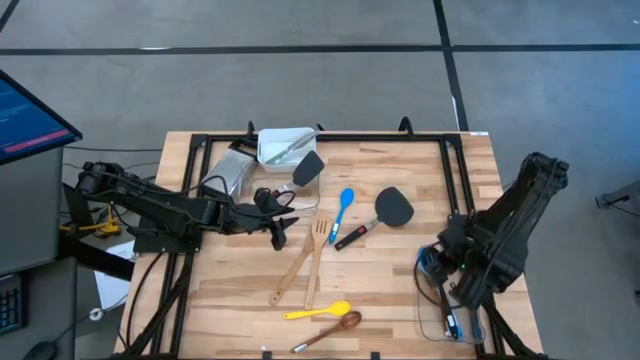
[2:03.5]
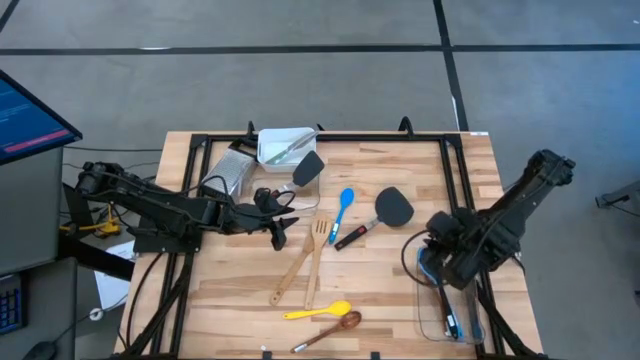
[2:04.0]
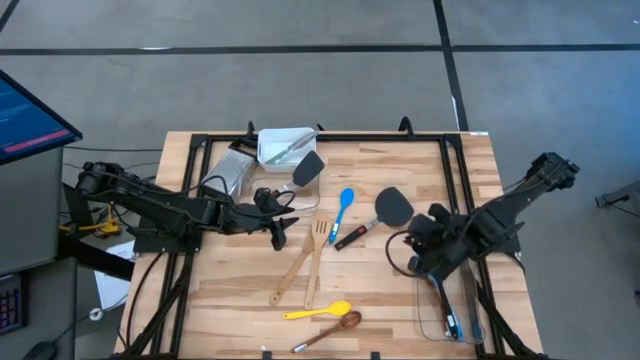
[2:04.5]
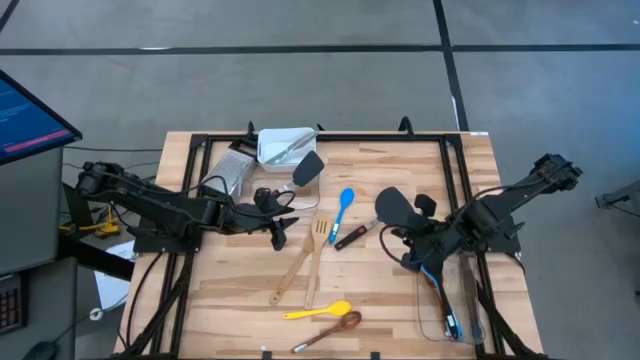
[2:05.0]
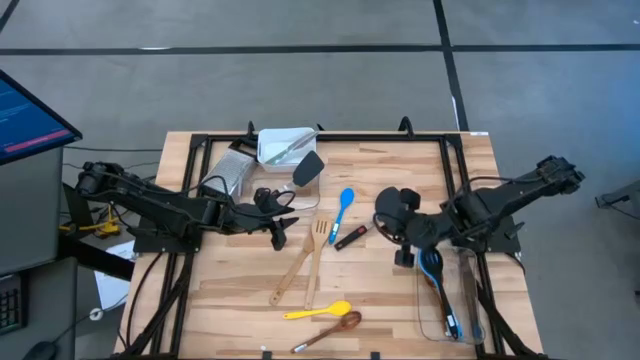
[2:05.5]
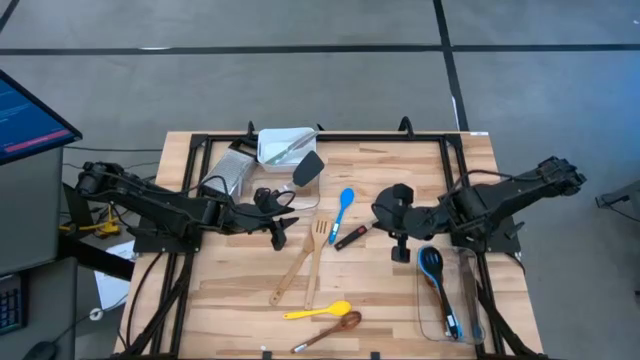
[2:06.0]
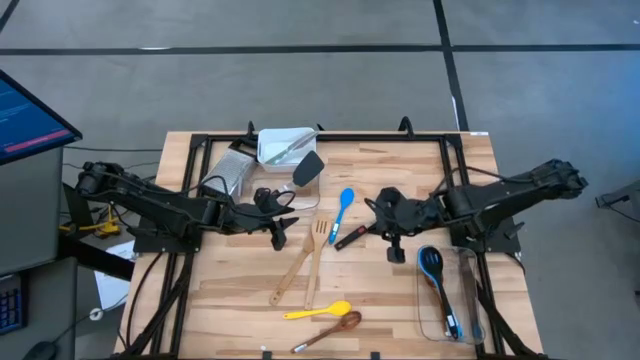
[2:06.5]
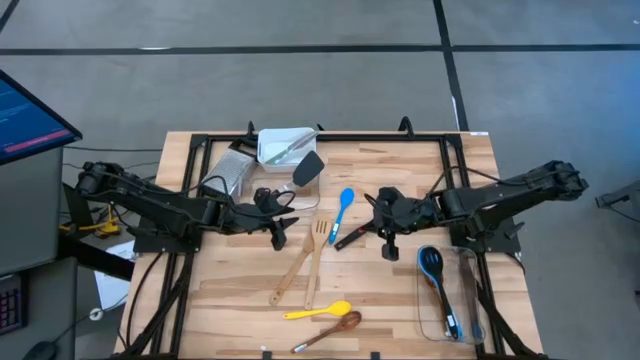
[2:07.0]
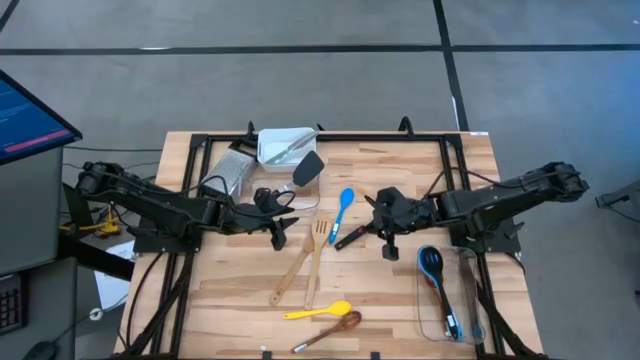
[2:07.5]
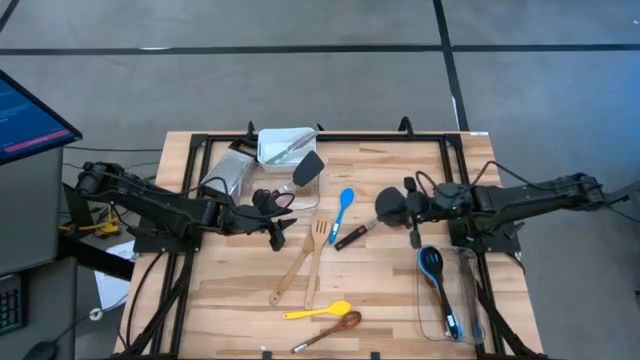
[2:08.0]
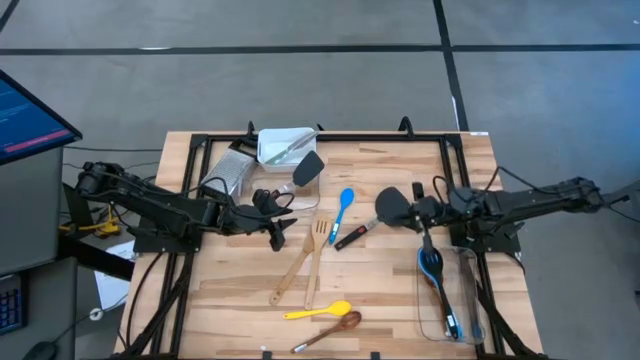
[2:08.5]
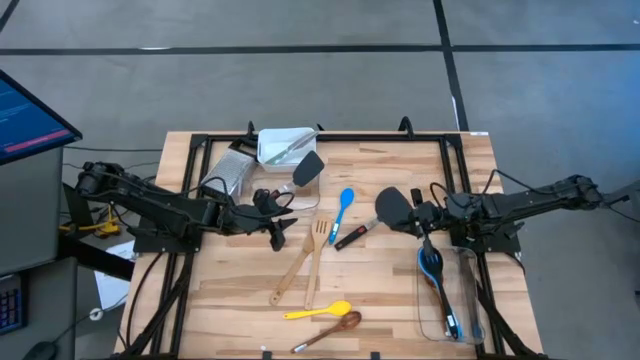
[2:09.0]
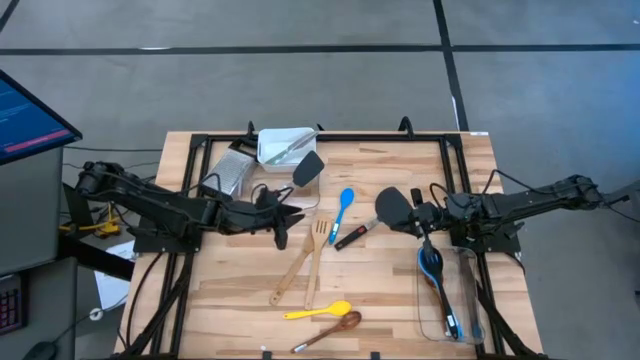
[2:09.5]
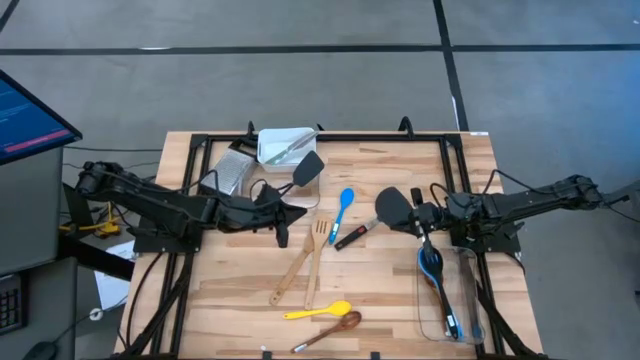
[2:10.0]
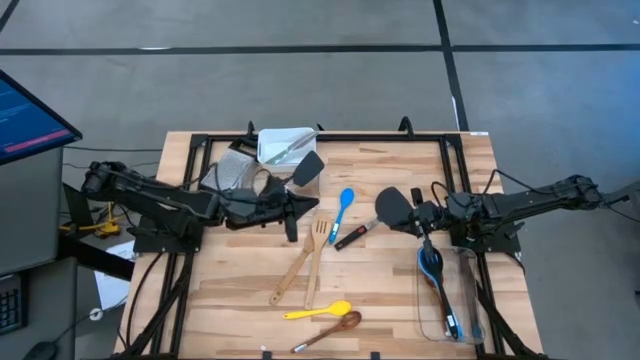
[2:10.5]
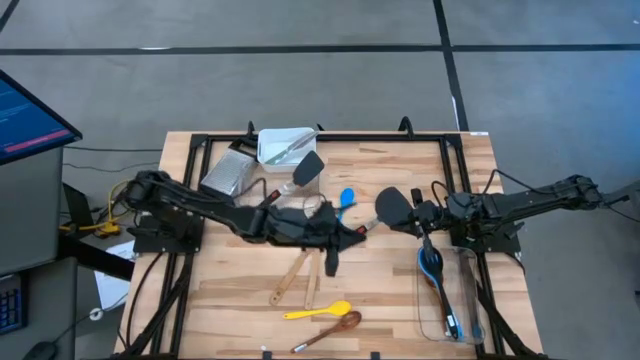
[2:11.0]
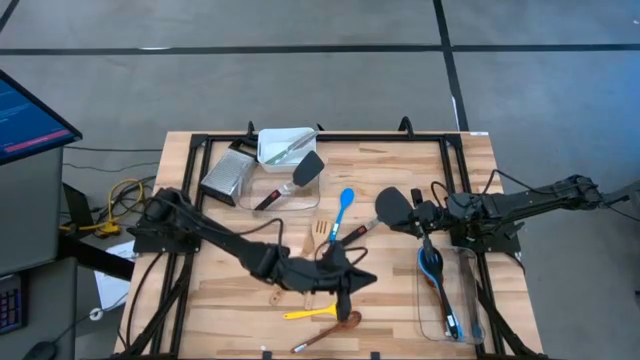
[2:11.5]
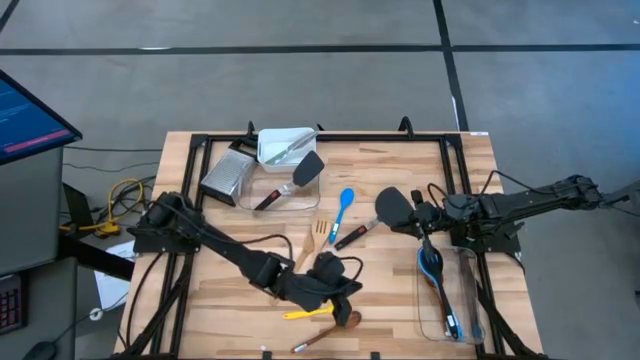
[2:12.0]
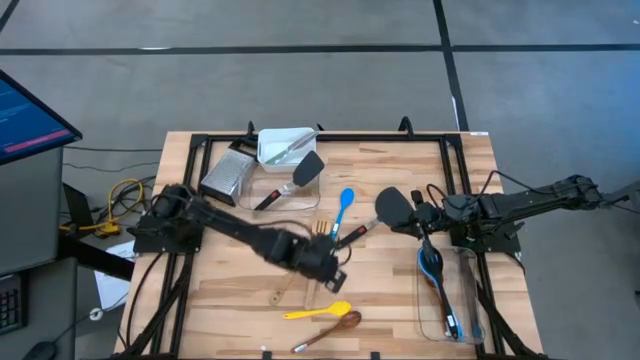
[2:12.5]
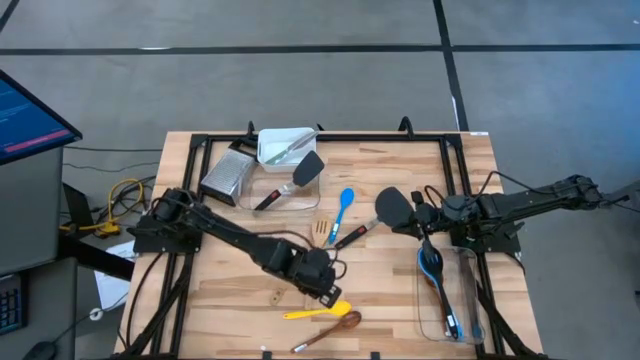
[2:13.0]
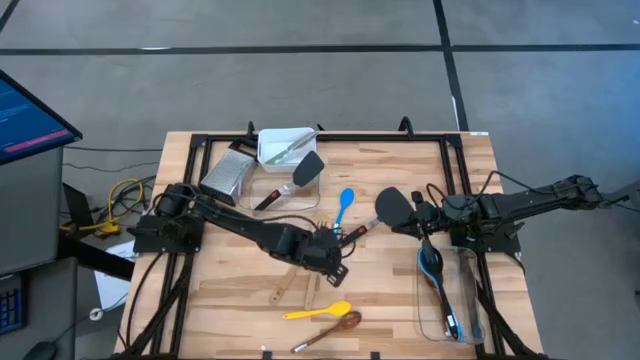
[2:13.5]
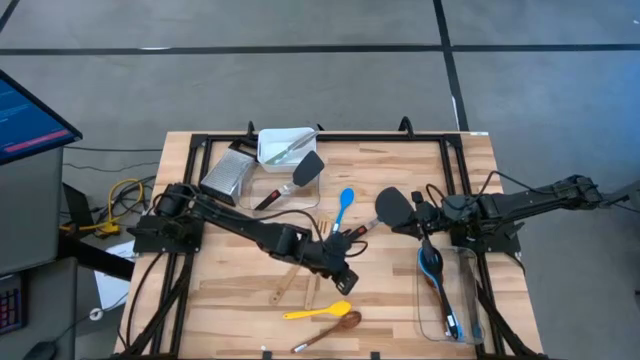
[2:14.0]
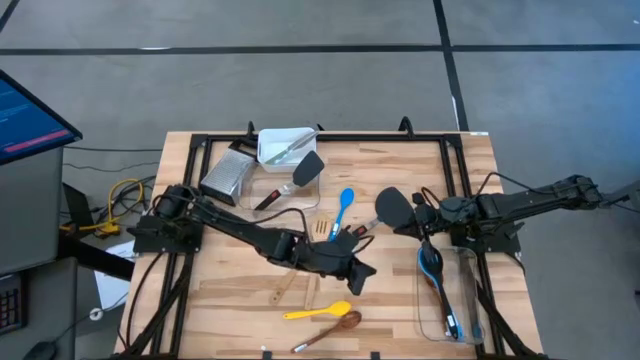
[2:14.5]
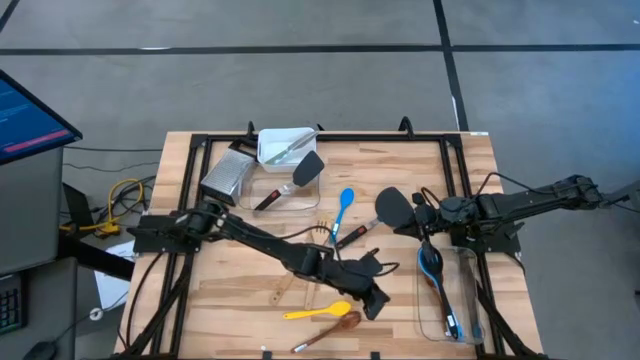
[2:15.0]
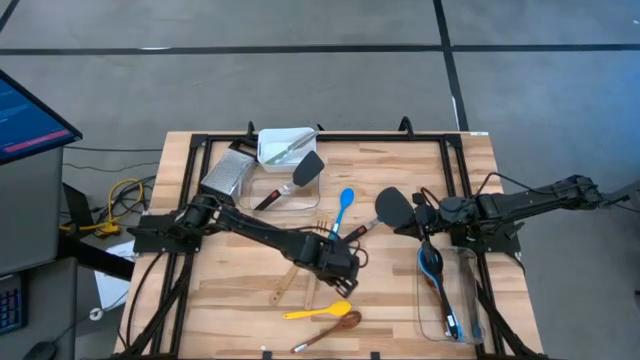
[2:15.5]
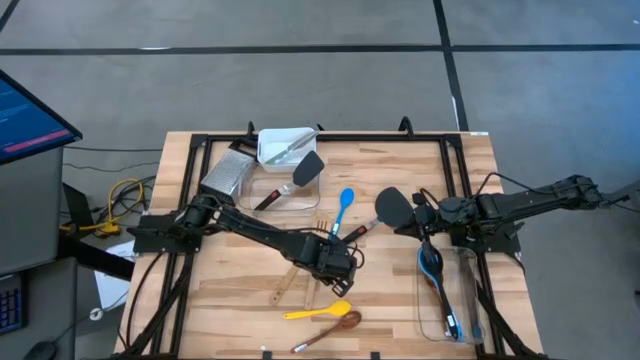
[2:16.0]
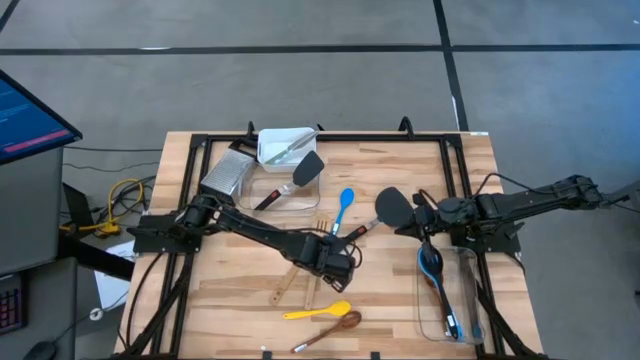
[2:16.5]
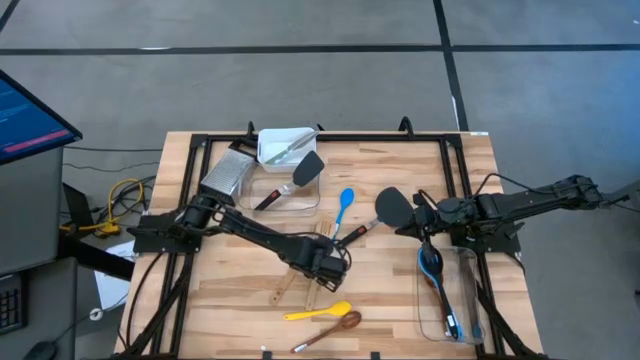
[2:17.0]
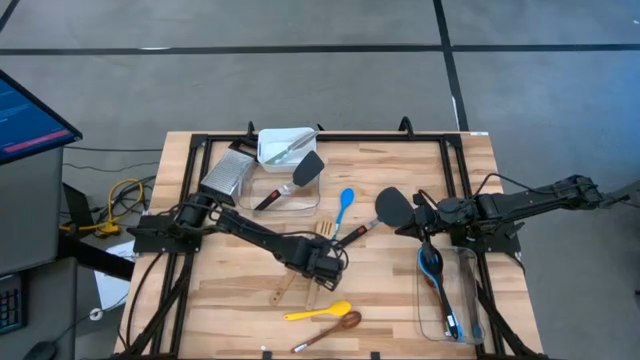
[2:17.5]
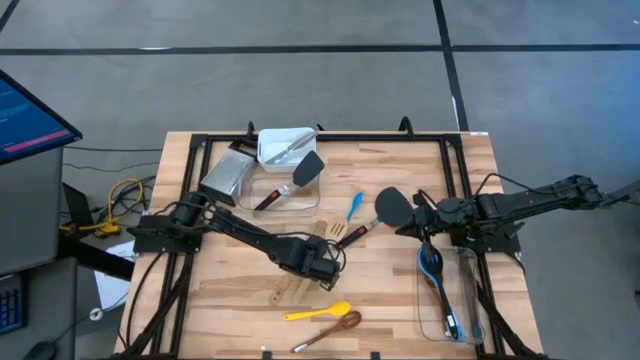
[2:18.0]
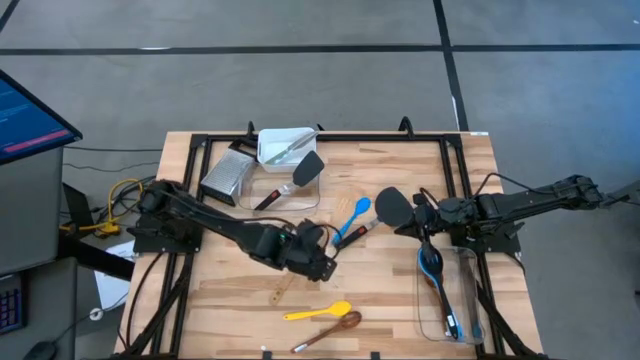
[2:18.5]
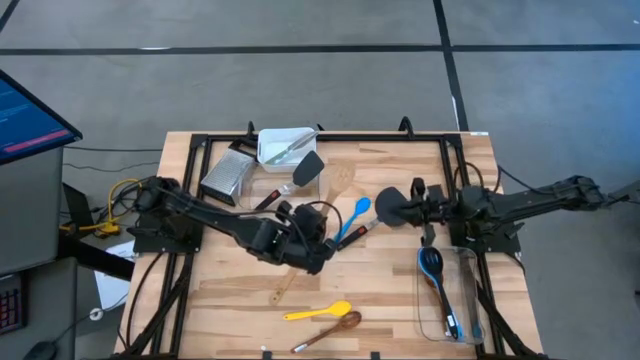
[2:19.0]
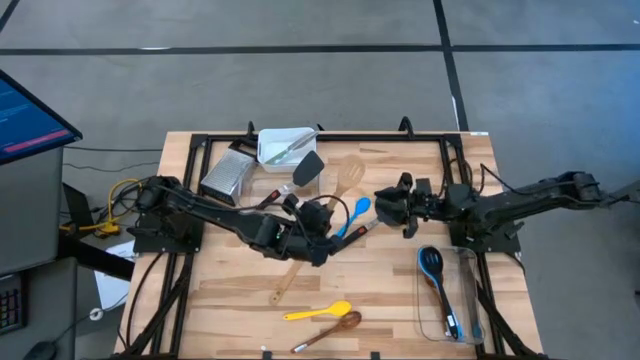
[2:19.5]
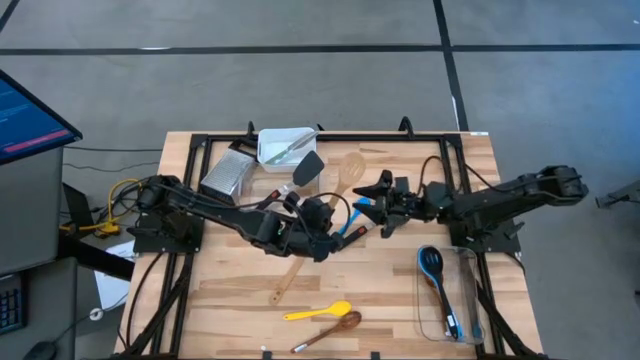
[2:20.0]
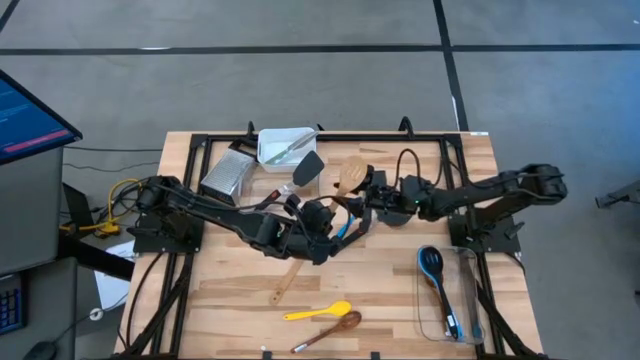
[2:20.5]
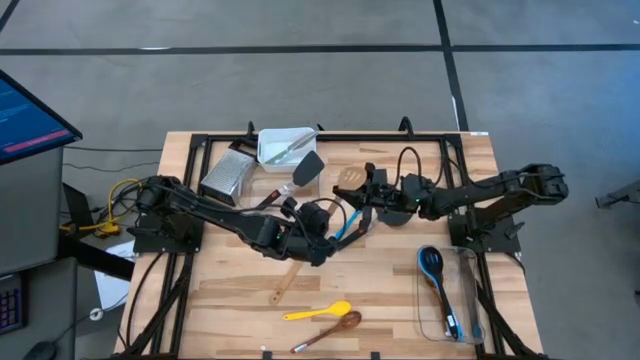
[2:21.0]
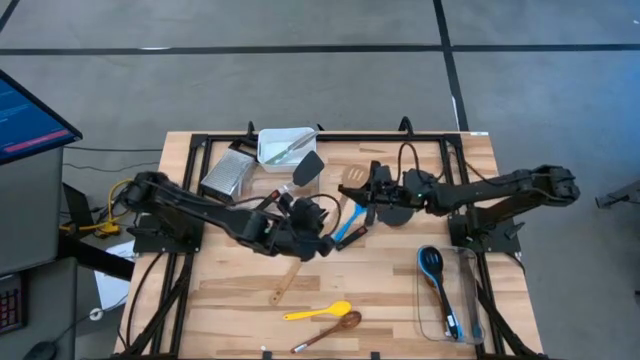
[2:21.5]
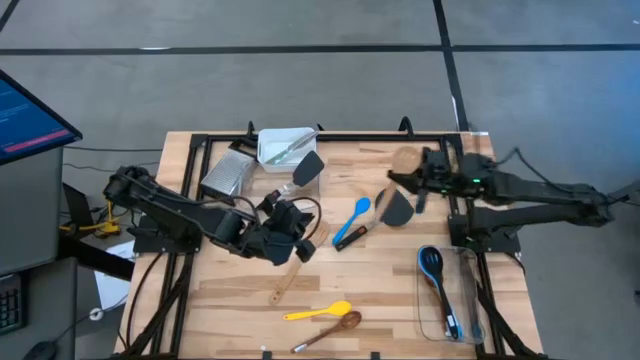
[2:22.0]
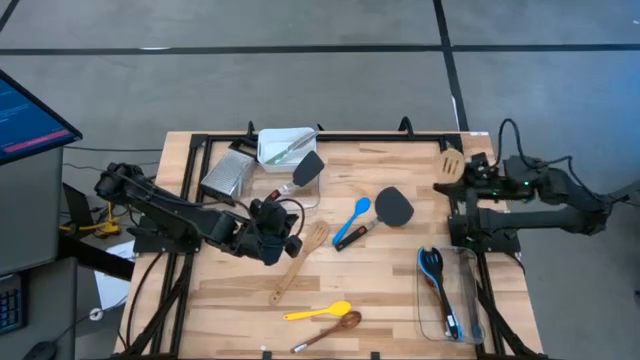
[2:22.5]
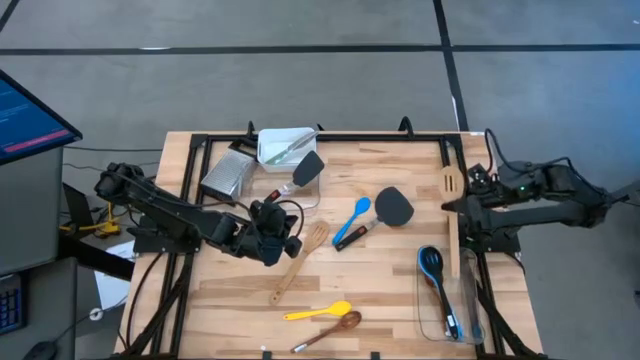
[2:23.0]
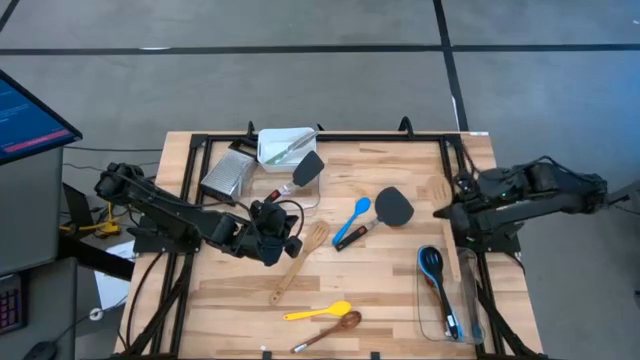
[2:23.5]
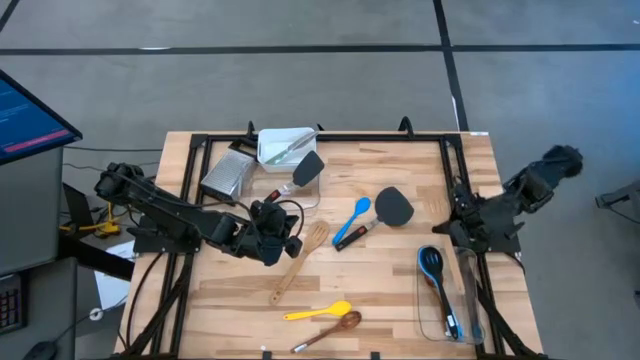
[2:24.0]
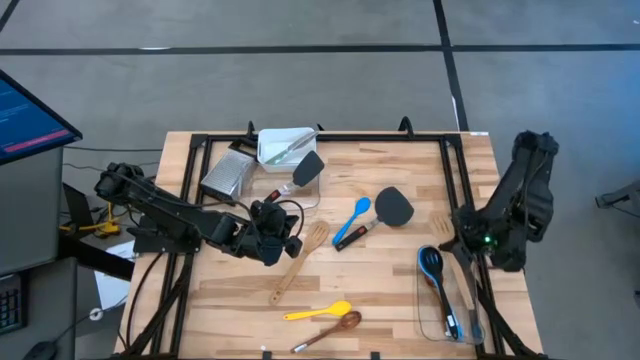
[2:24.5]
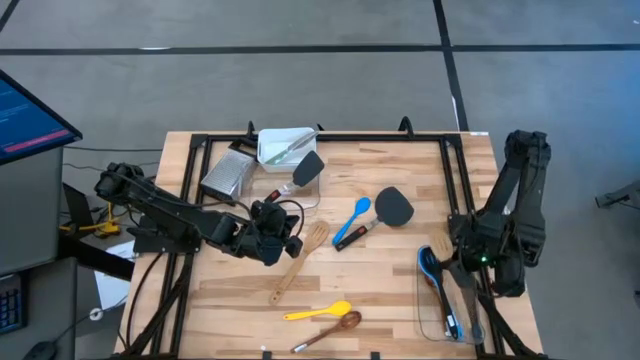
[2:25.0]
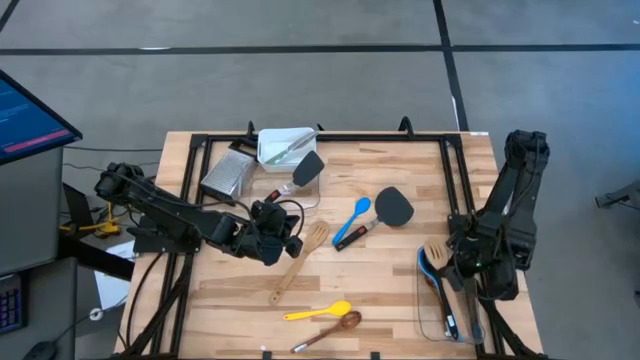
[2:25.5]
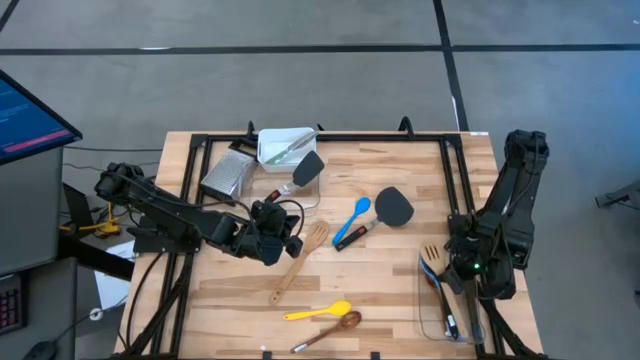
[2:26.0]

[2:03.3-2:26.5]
Task: Pick & Place Kitchen Items
Put the right wooden slotted spatula into the right transparent bin
